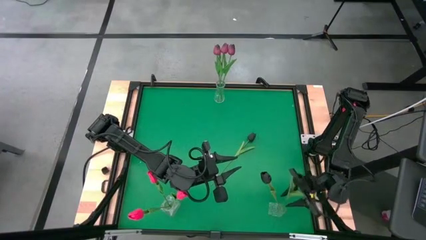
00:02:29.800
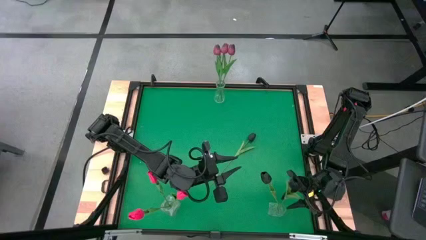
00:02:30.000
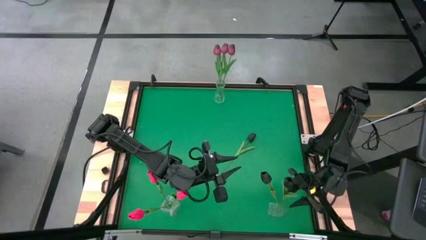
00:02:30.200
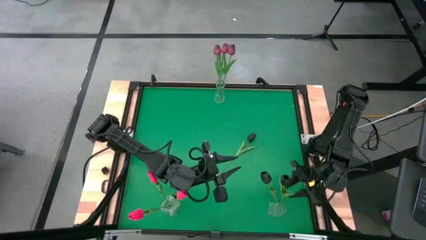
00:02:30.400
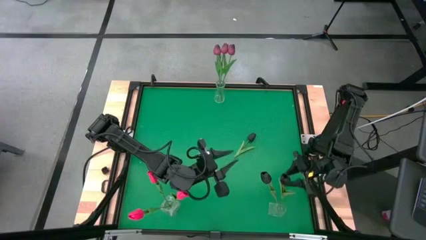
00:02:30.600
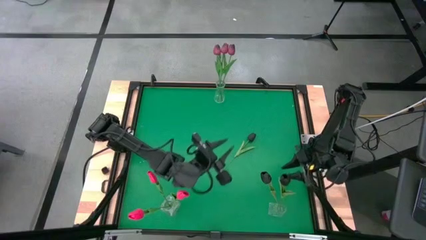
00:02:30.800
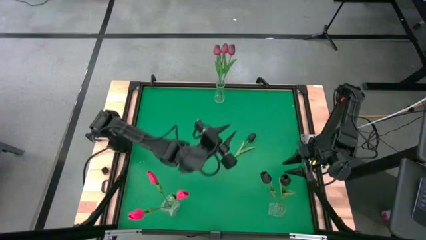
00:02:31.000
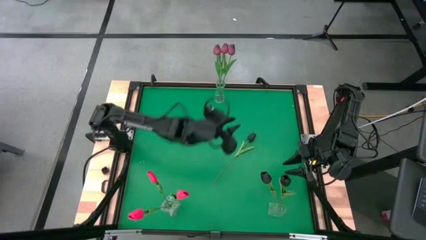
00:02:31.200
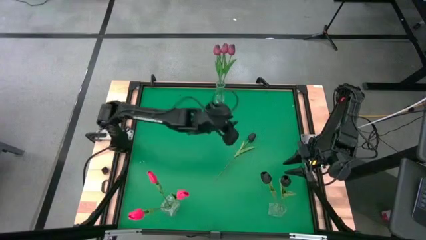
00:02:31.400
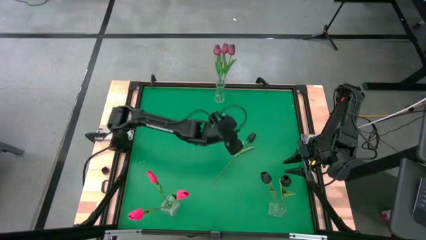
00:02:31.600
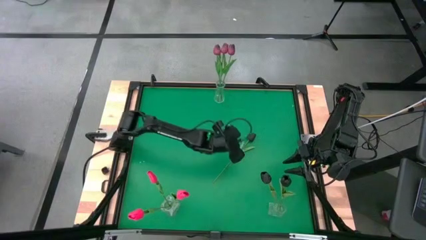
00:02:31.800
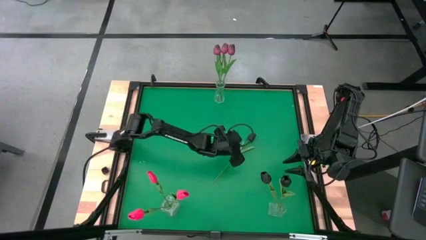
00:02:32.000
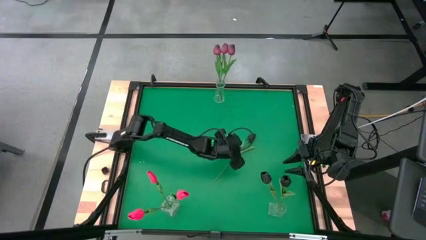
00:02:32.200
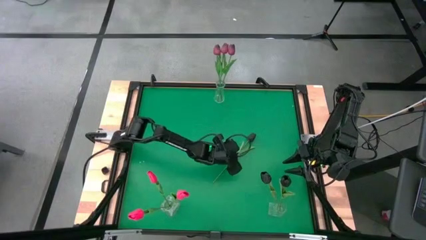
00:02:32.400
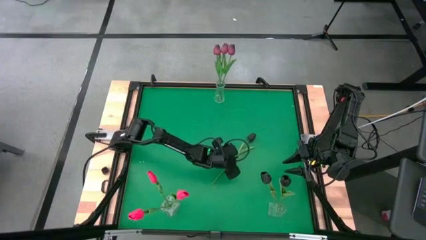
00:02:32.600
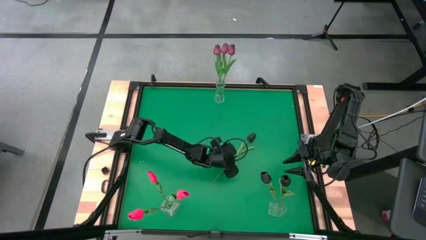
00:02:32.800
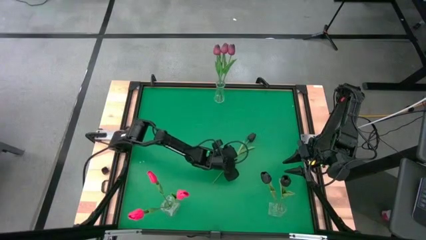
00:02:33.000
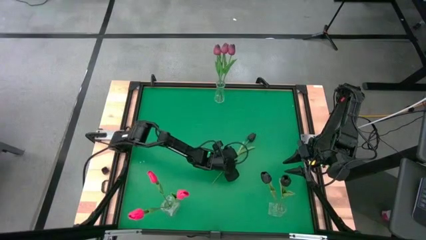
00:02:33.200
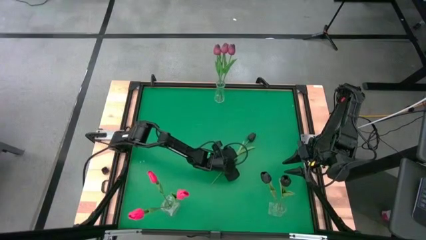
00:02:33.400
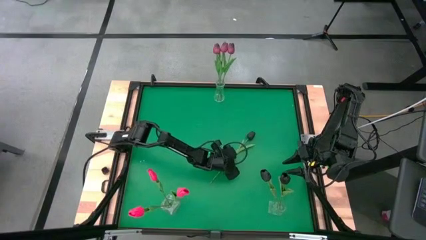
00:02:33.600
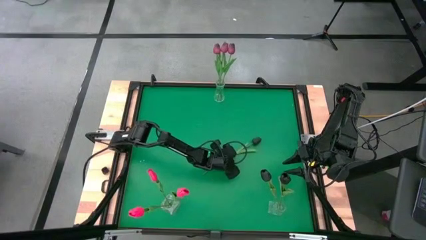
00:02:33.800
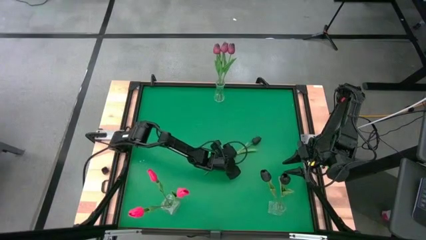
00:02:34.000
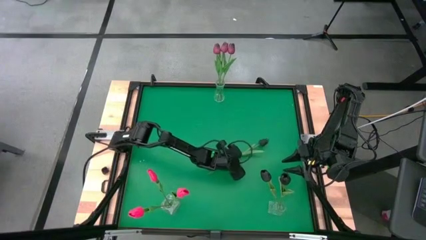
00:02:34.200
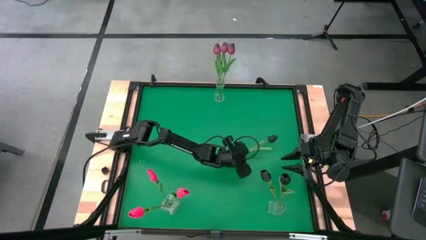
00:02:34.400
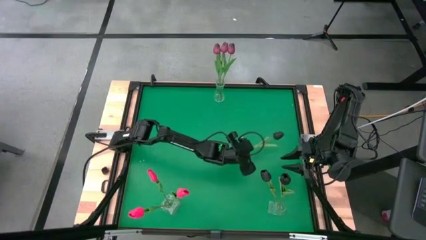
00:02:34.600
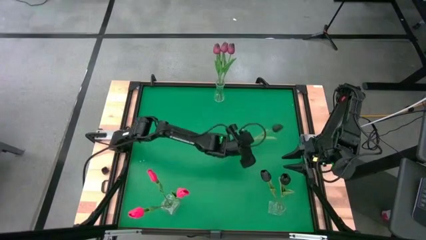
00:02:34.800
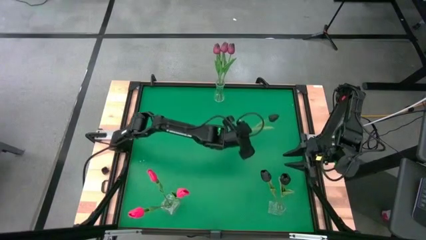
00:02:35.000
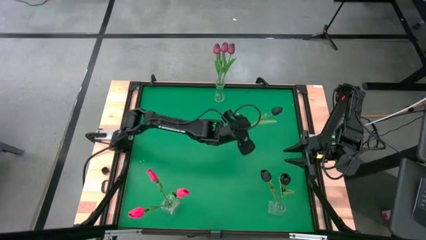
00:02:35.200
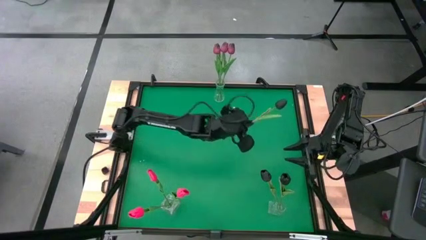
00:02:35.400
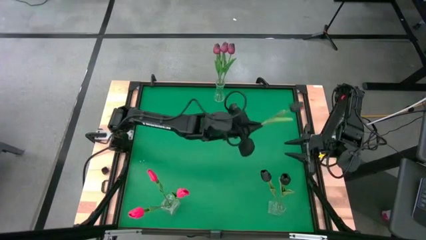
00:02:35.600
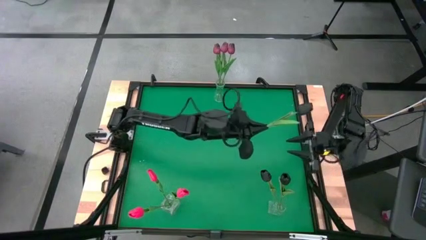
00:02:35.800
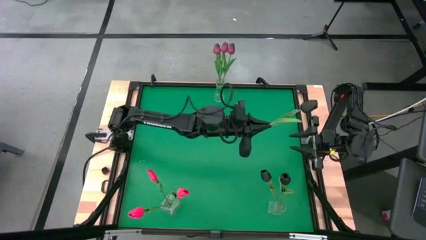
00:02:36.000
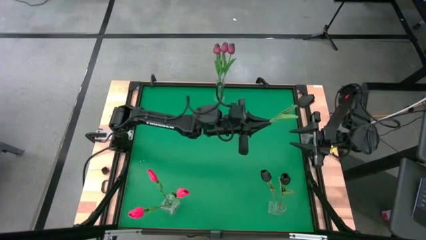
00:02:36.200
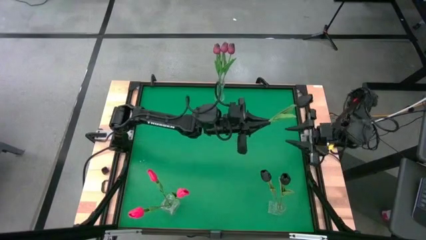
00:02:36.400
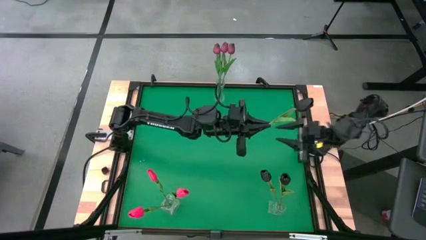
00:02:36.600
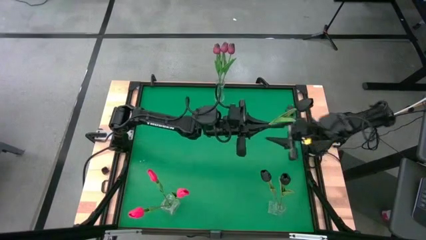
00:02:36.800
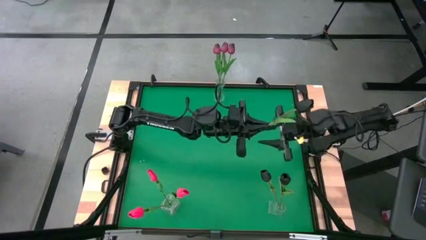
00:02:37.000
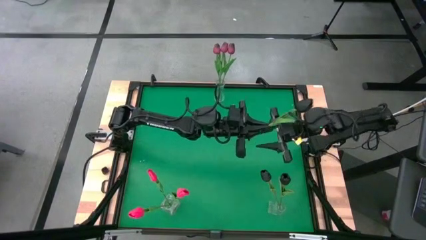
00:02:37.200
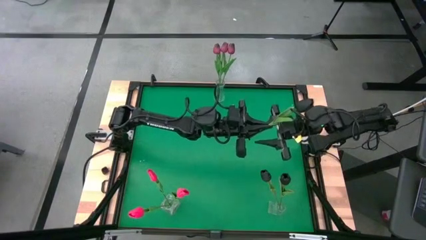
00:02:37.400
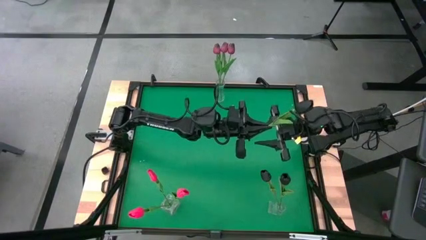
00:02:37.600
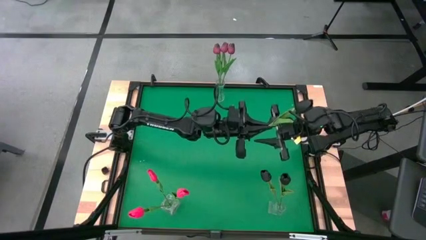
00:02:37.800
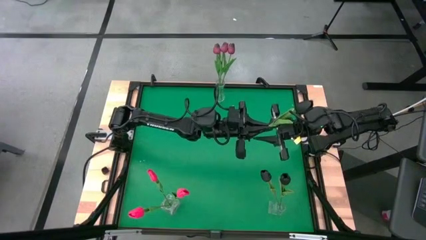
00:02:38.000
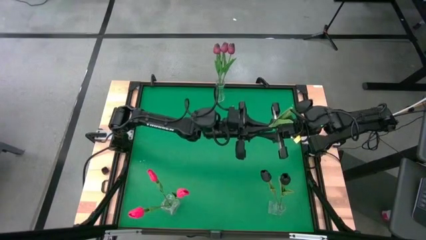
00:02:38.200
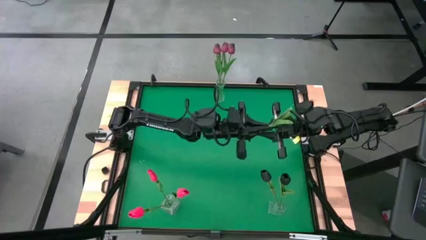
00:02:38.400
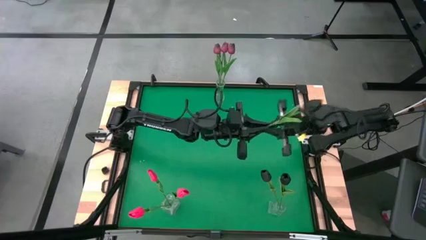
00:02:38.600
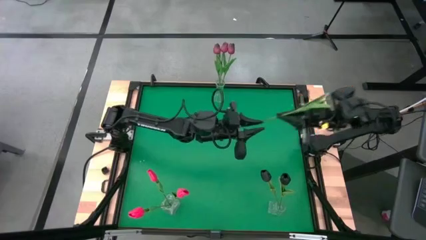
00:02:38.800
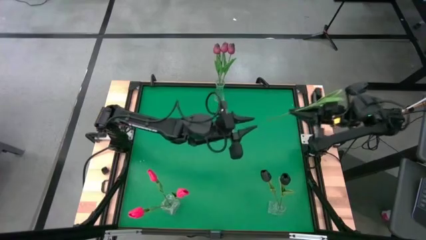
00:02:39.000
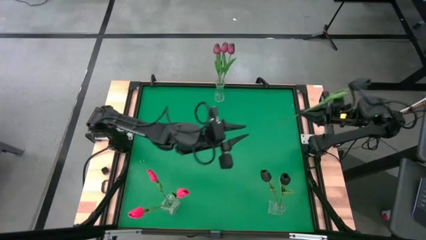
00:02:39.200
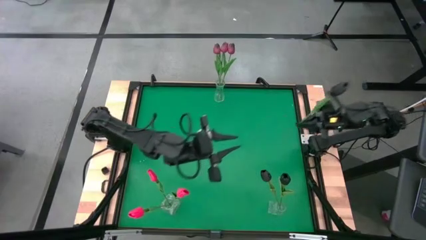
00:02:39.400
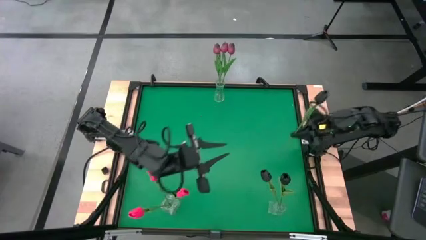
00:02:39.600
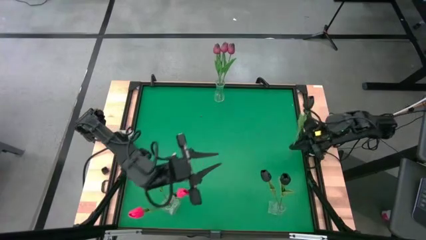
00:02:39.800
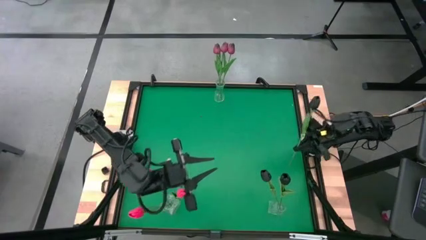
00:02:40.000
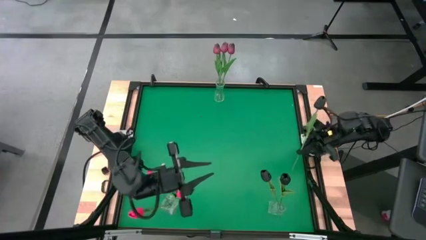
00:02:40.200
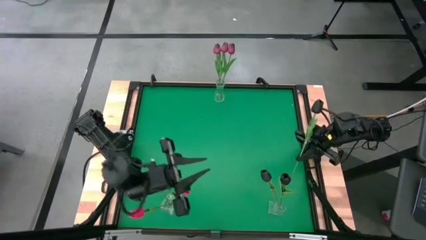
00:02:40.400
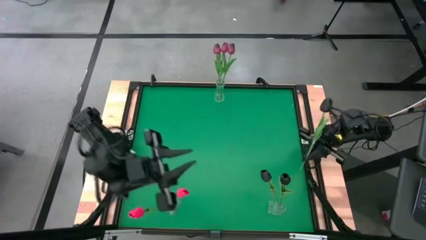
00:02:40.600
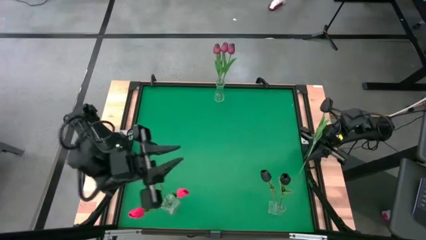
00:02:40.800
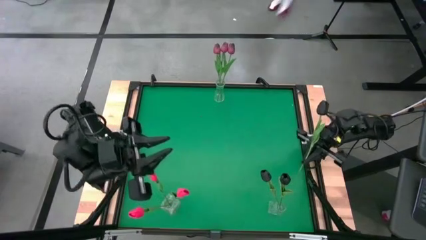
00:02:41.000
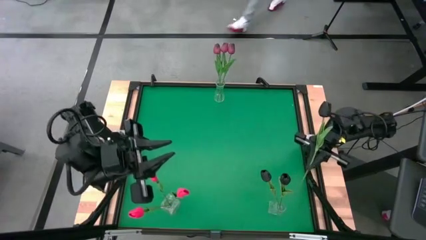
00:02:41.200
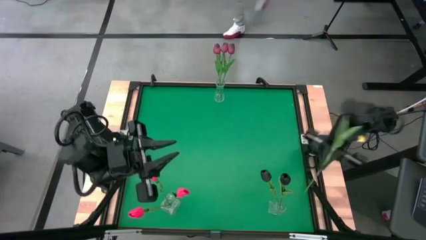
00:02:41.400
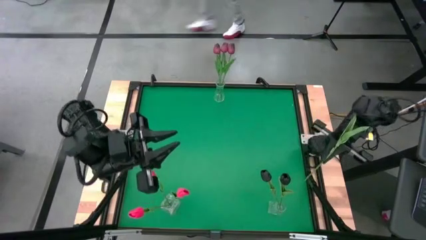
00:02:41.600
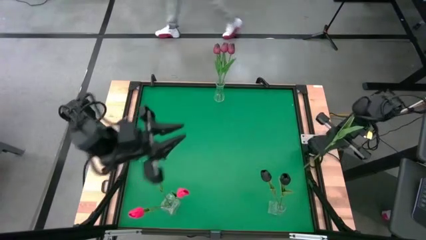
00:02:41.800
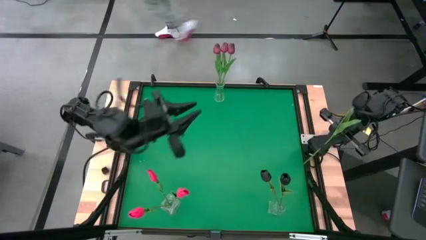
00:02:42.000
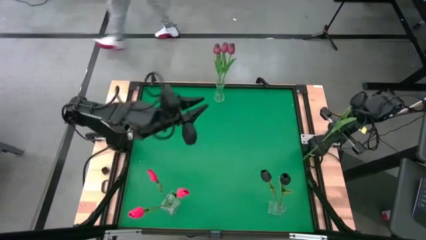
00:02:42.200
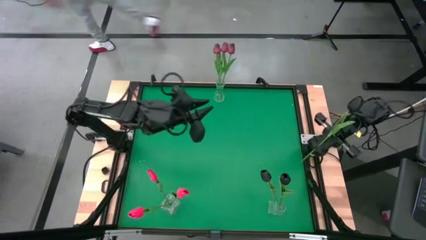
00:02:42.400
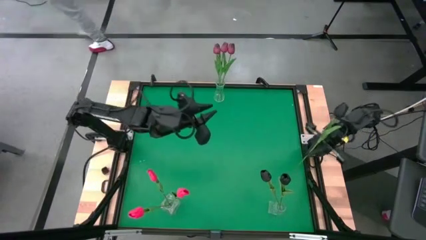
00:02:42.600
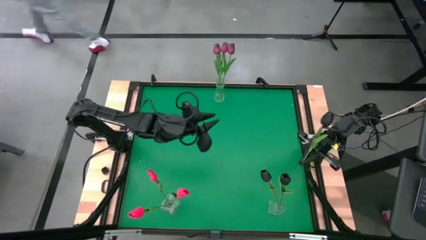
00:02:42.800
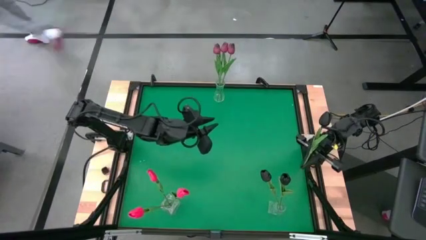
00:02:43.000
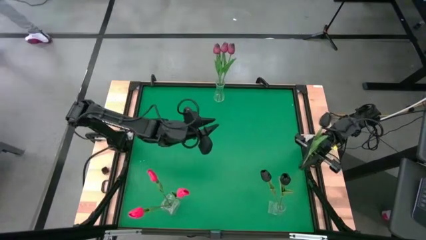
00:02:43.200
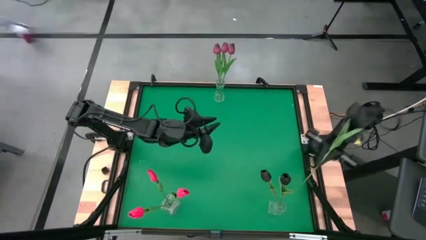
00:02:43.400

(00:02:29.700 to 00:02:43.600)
Task: Sort flowers into vase by color
Put the black tulip into the bottom right transparent vase
